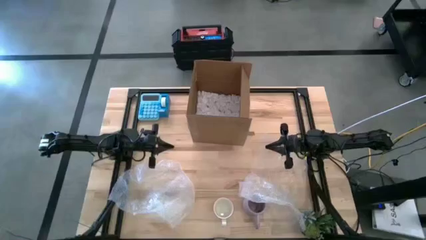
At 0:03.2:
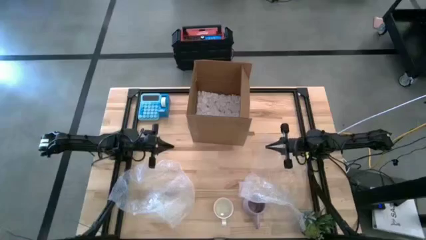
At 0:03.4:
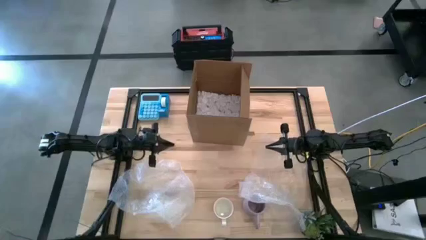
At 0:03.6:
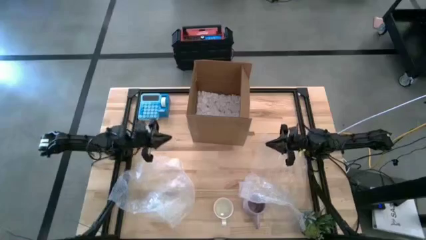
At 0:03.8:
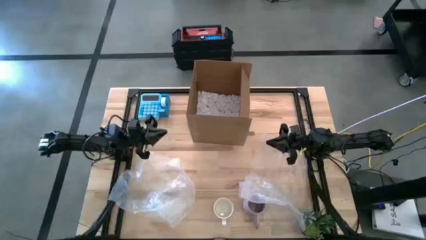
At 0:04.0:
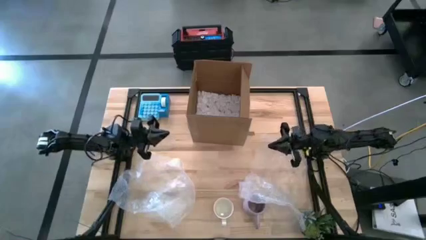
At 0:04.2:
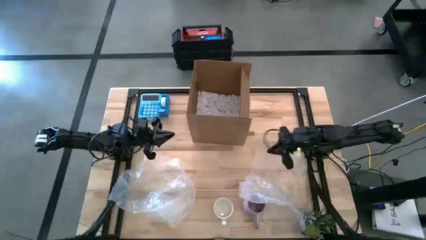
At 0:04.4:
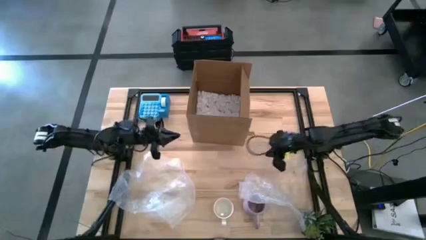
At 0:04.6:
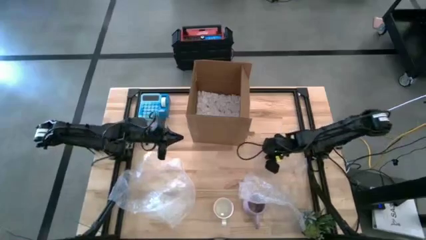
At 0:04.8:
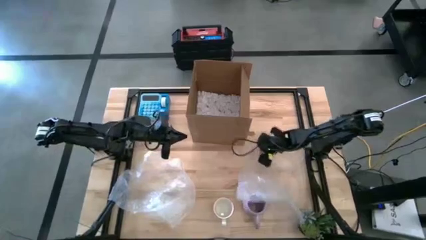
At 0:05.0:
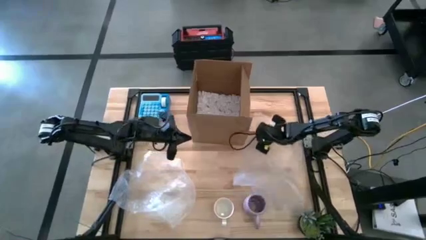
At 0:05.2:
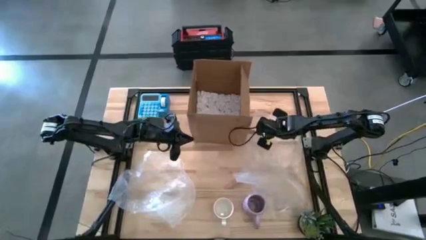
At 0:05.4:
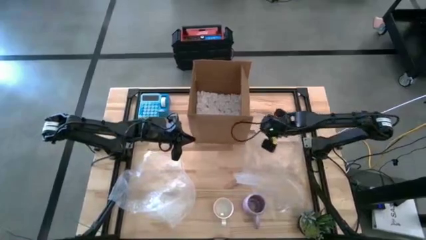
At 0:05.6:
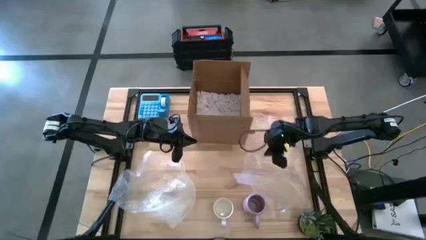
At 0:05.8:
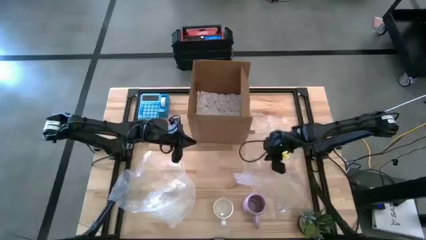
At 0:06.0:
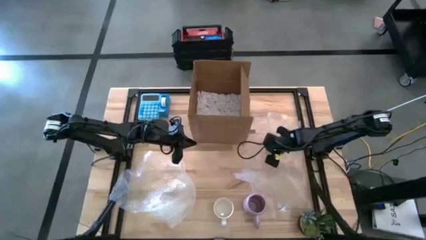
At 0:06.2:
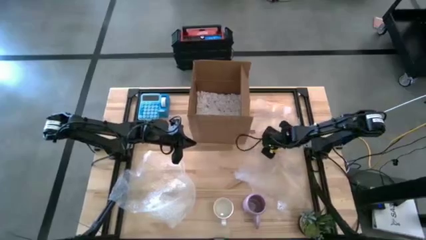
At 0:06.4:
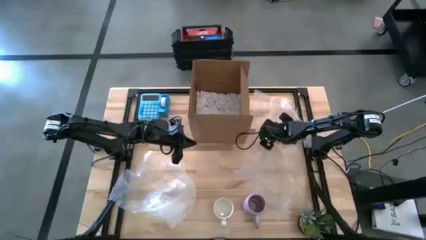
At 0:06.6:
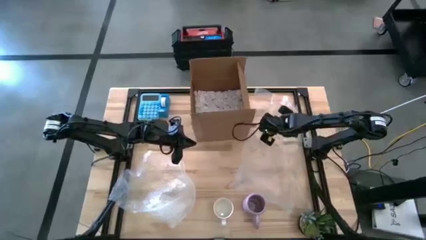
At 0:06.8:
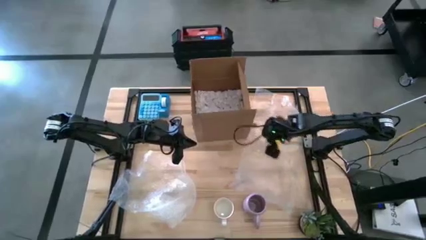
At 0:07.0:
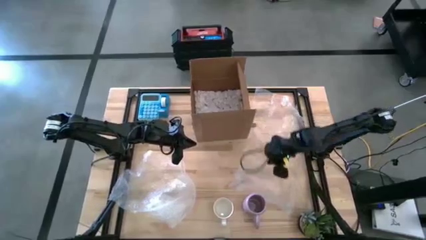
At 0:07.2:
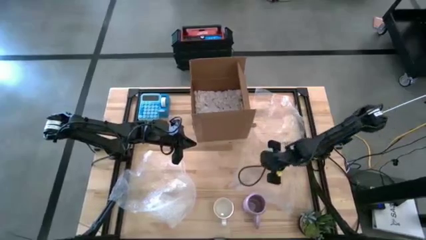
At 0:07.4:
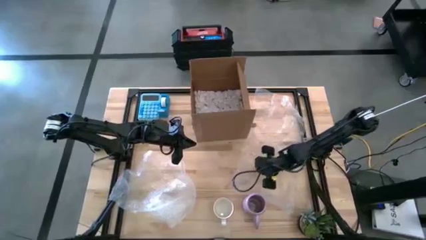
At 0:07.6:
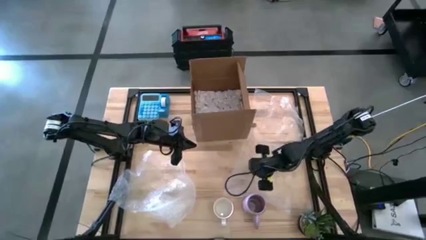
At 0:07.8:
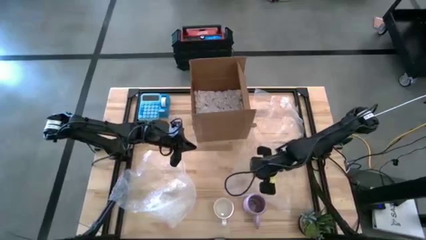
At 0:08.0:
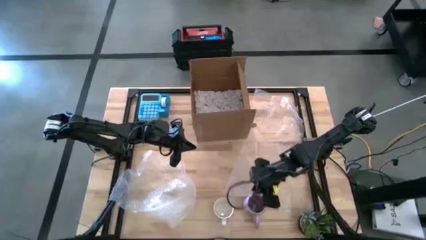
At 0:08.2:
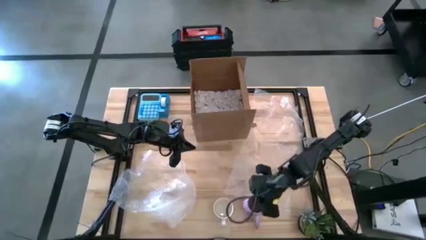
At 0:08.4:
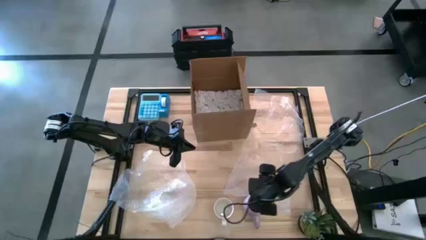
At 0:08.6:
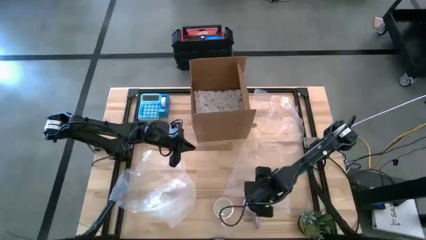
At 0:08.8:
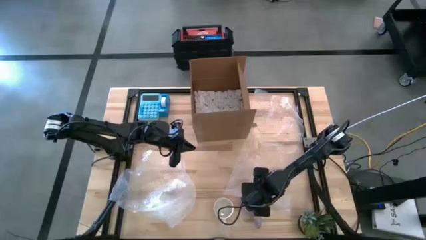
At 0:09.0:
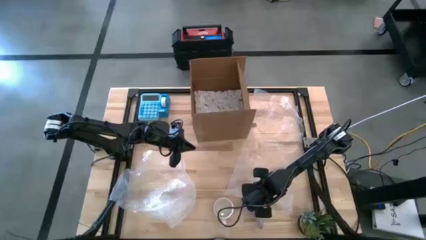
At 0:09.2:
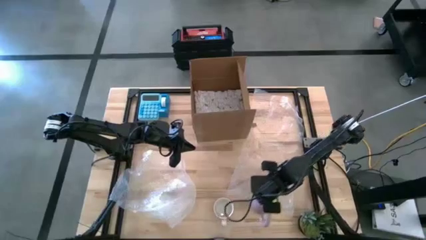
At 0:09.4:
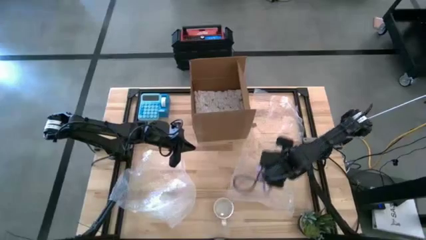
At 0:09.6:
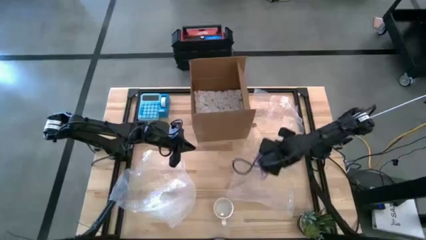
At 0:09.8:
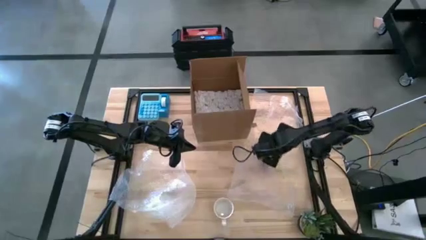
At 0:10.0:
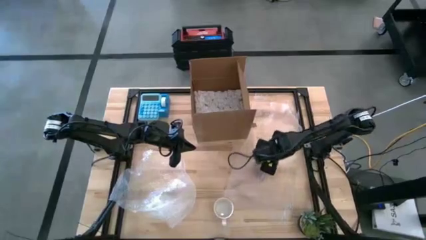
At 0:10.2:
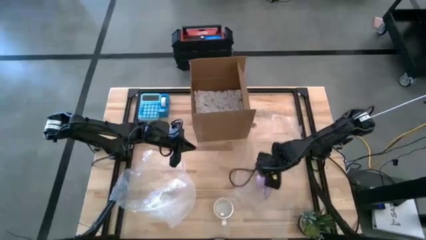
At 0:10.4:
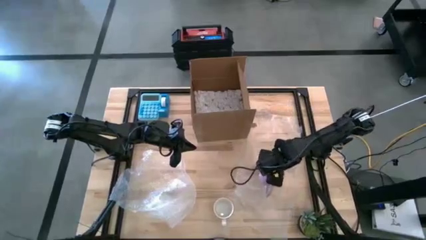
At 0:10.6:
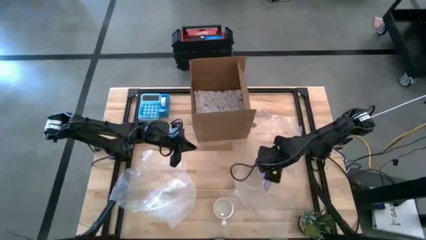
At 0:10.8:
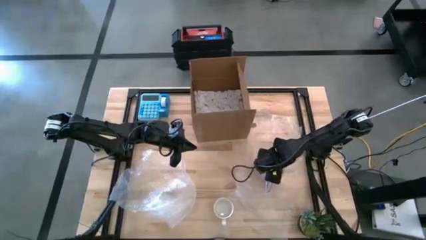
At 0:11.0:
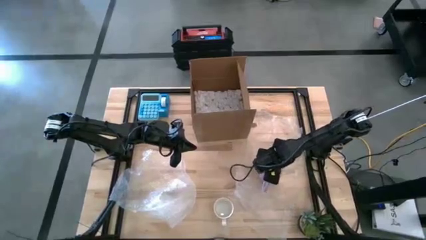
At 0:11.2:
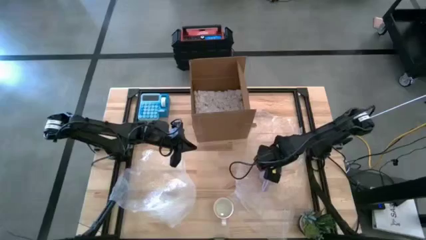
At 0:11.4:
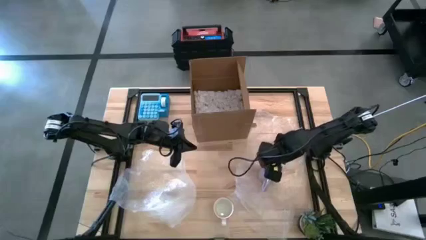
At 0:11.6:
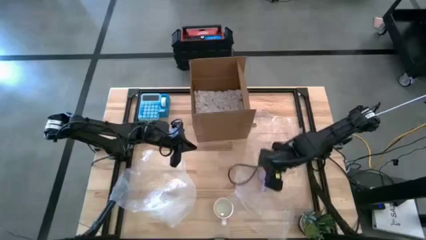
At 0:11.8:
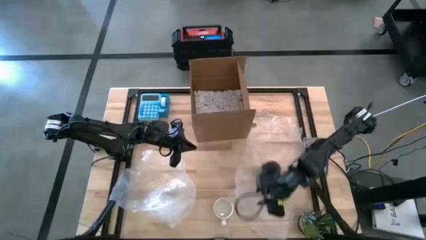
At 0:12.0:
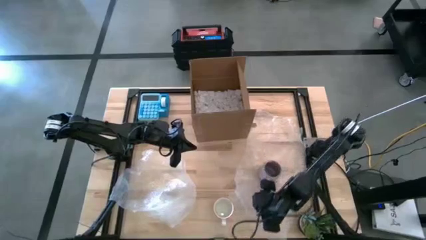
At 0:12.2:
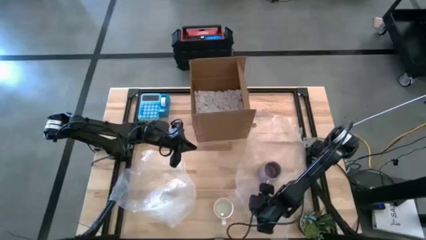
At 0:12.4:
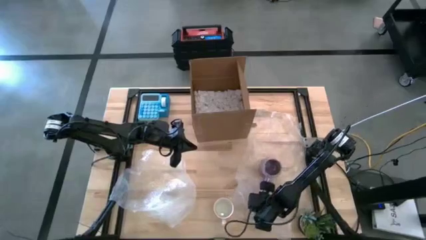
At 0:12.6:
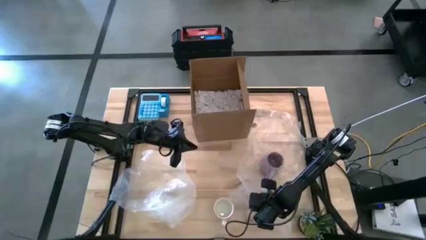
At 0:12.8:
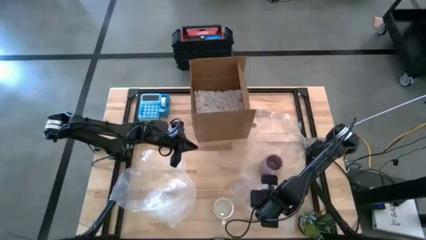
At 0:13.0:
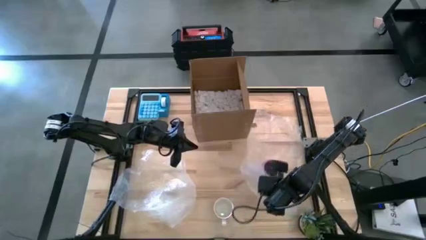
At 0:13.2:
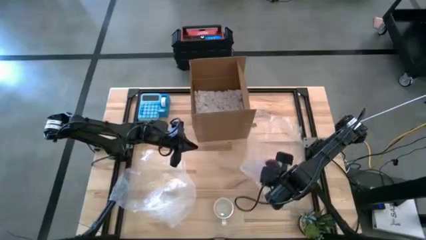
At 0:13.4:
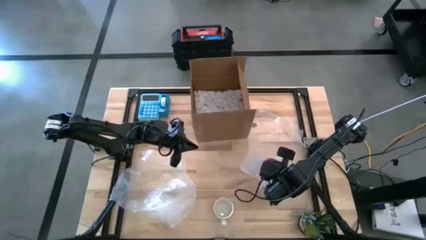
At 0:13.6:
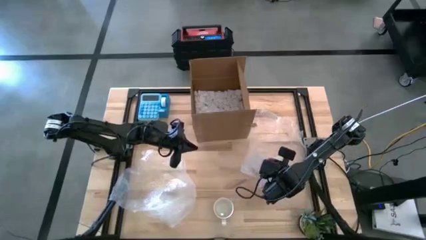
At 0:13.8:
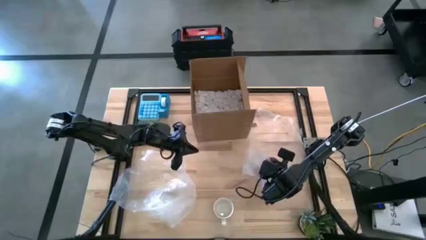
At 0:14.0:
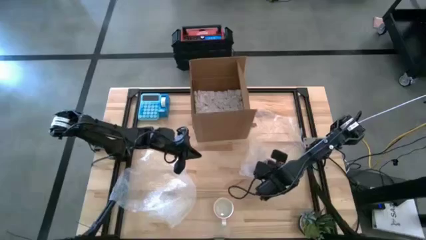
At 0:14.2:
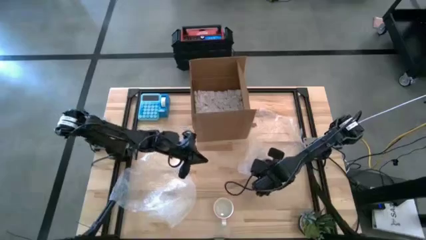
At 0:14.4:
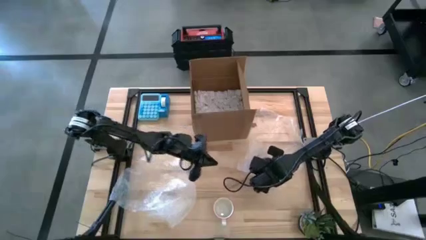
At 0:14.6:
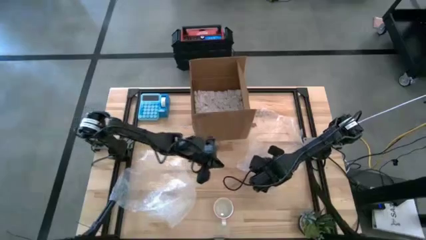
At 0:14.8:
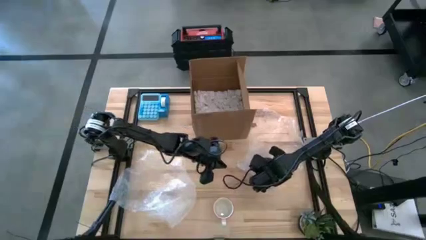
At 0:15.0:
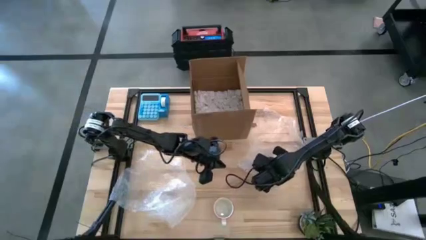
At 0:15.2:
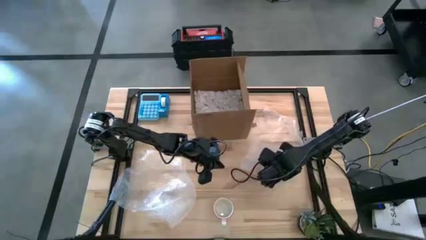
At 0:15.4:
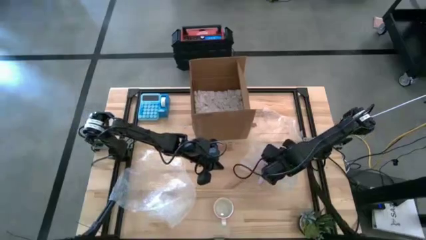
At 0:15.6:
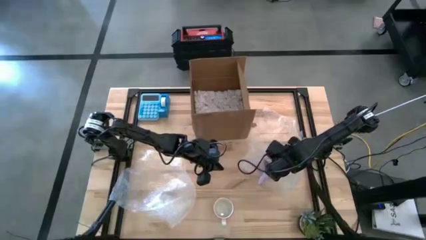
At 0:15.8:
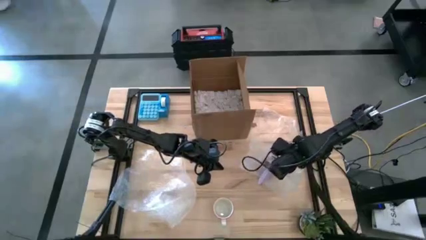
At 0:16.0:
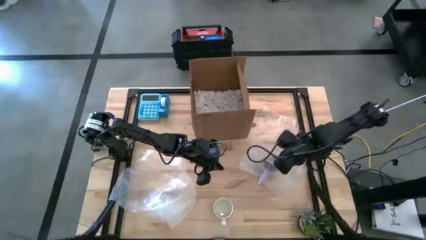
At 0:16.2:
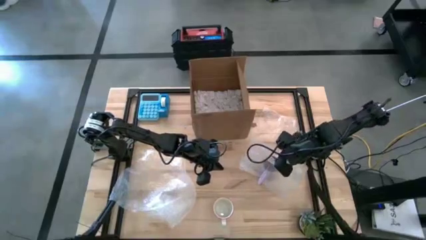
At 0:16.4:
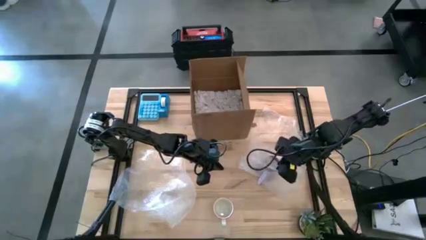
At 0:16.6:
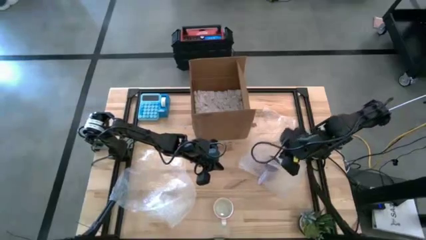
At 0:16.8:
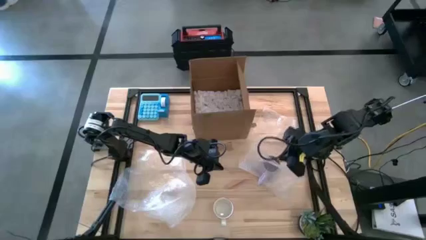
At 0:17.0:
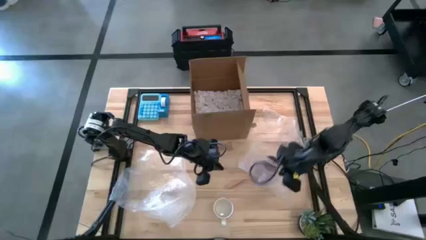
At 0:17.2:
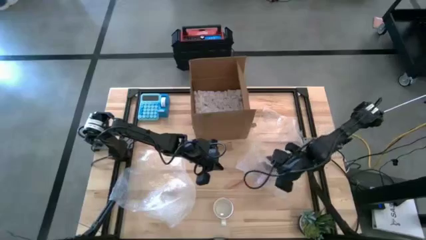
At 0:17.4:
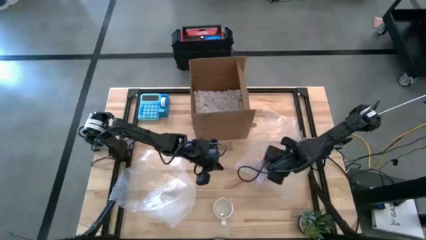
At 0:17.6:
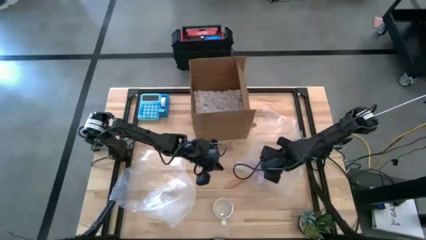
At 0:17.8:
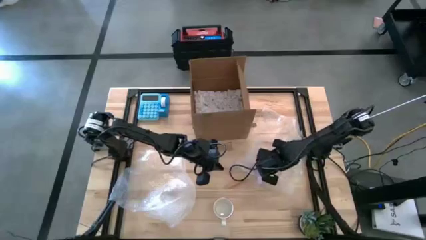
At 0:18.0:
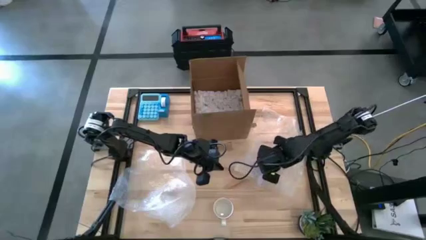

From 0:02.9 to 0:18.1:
Task: wrap mug
Wrap the purple mug using the right bubble wrap
